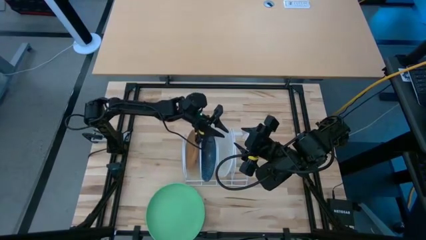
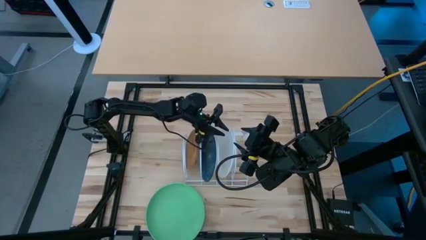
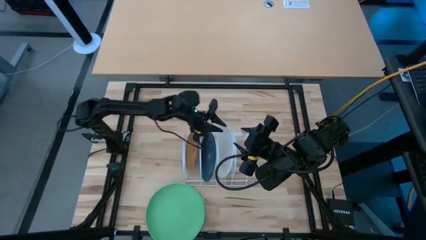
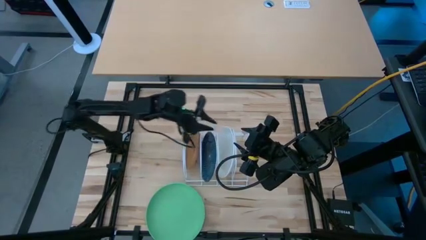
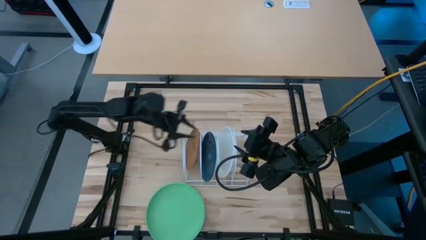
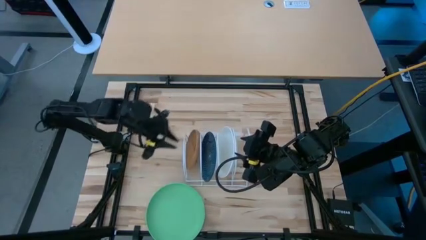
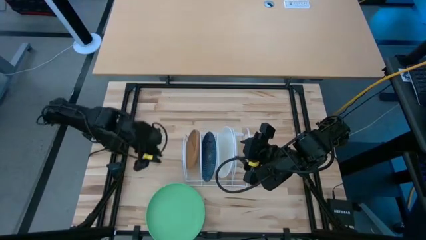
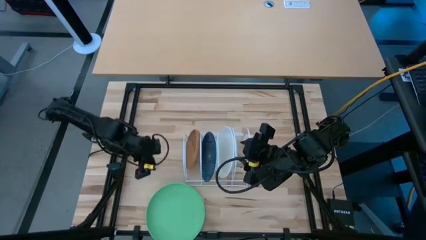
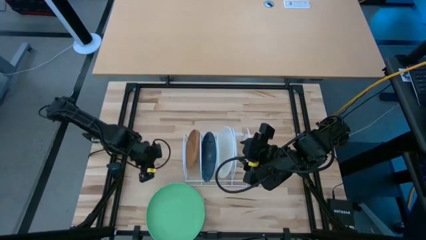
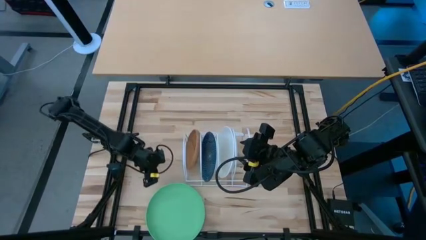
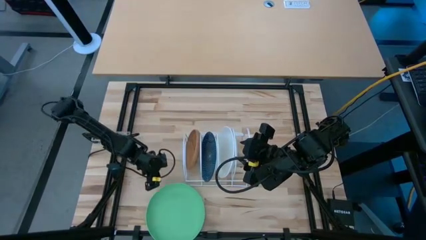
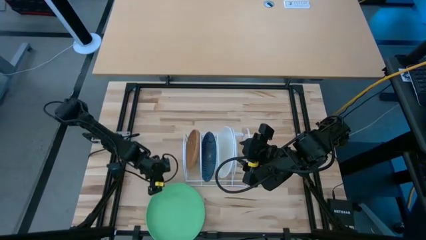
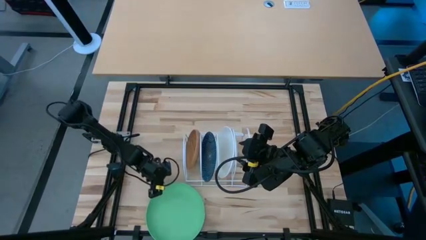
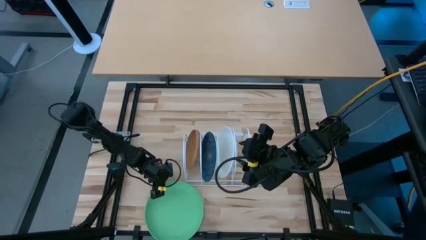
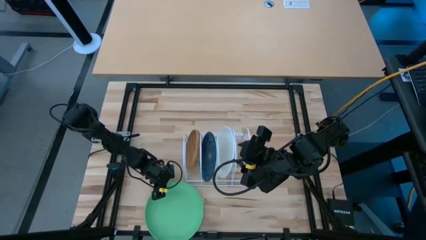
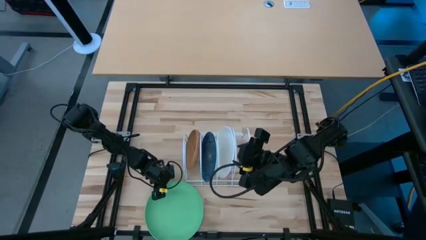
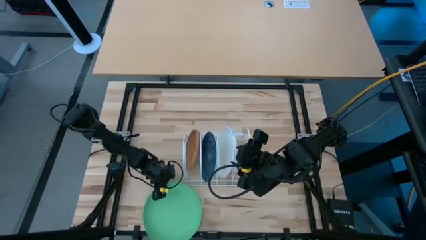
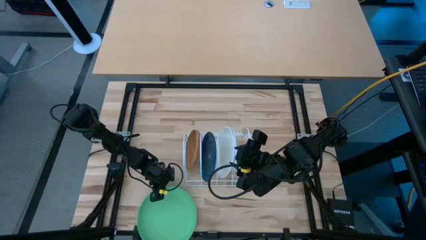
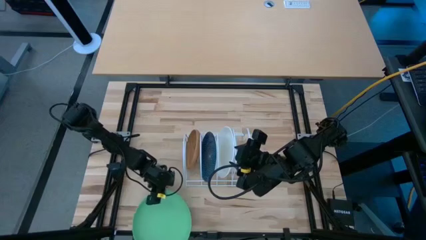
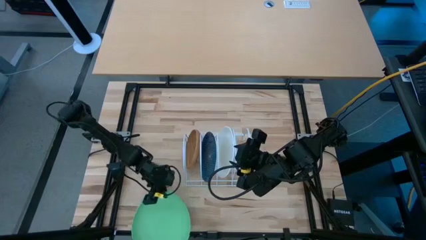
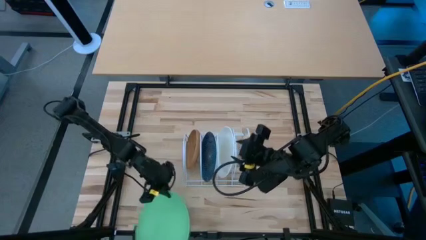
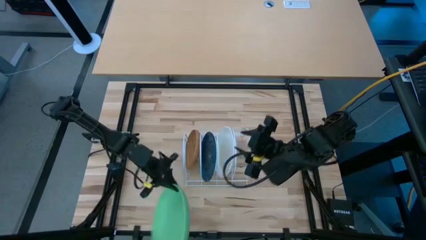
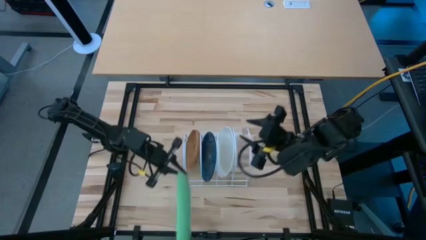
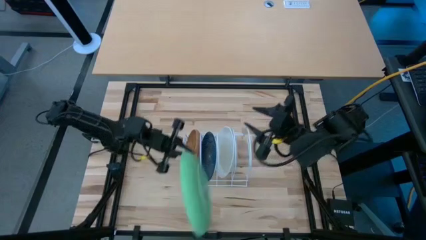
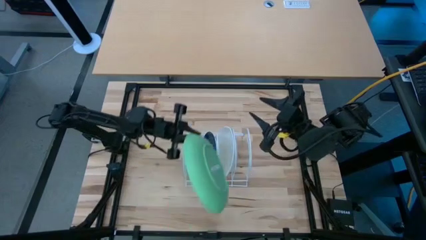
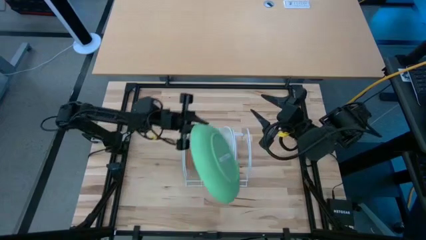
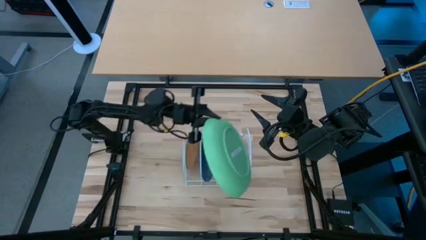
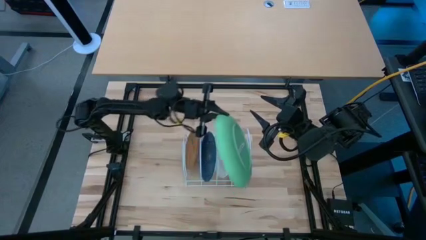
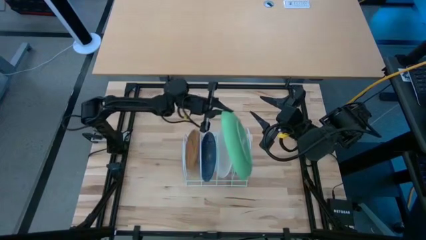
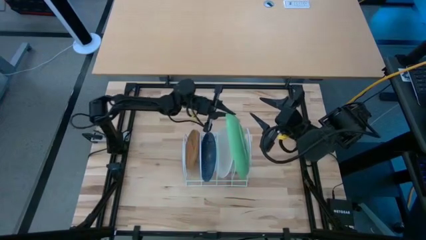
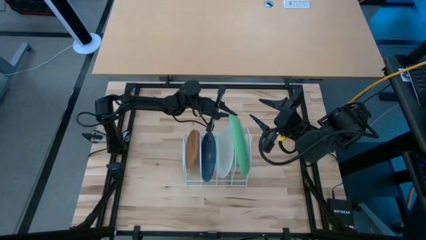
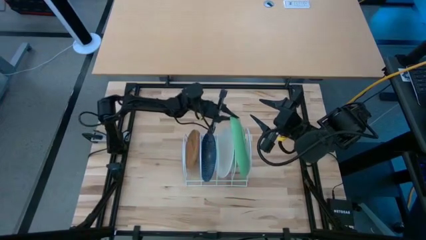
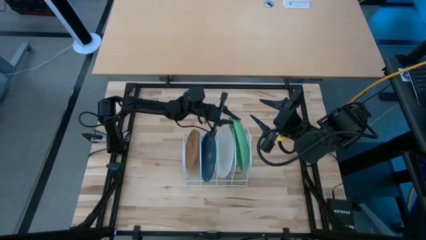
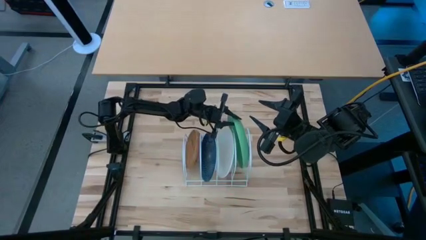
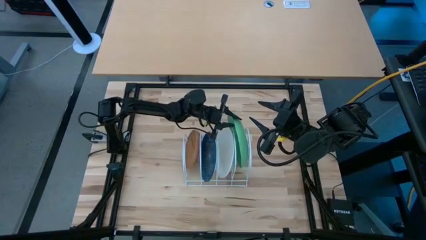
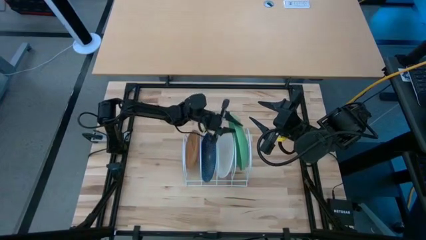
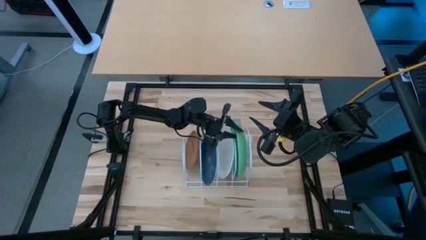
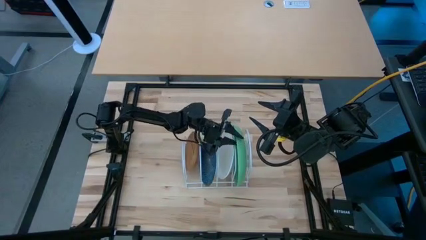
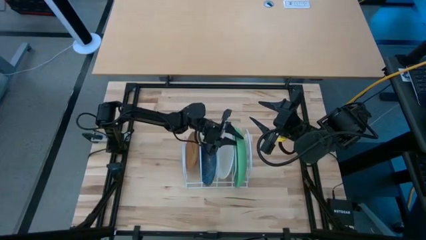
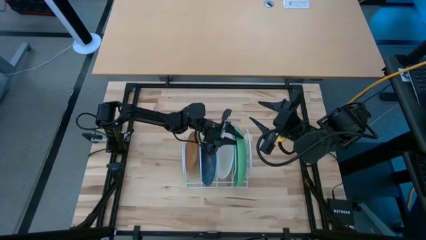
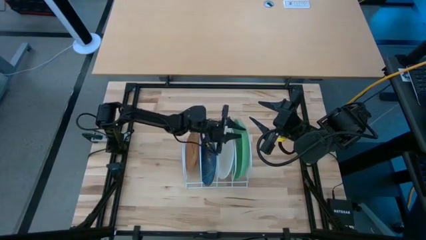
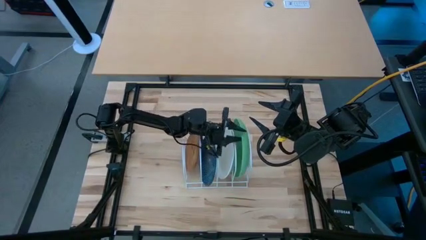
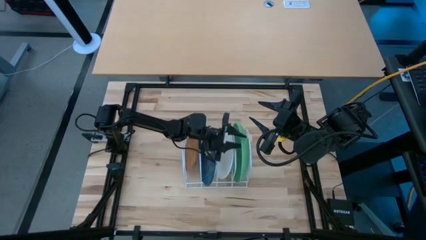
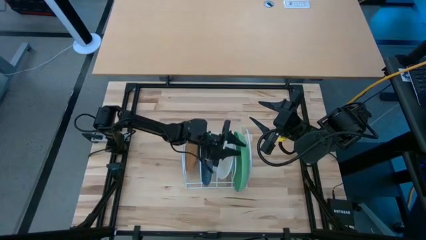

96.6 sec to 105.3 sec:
Task: Sort dishes
Put the green plate into the dish rack

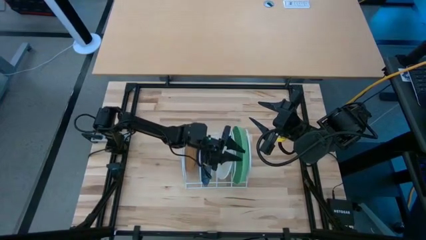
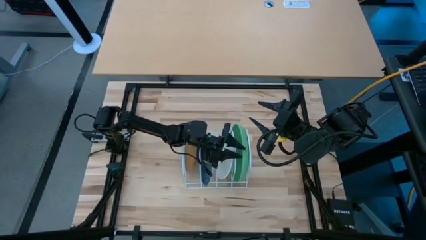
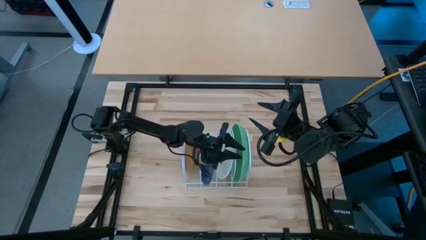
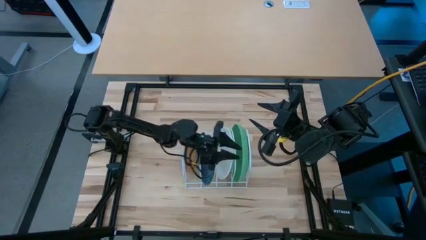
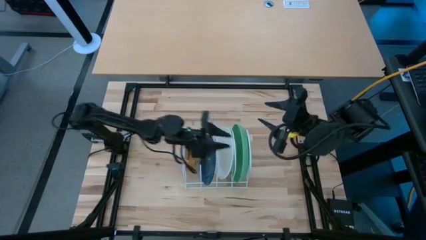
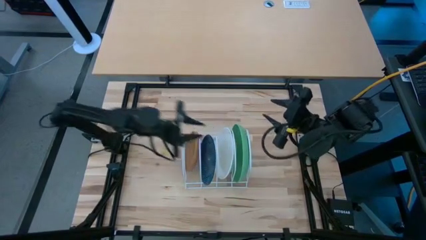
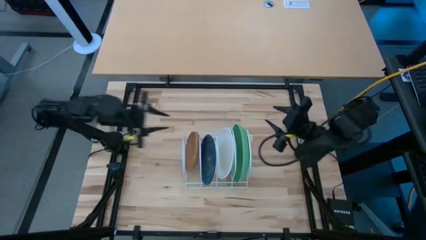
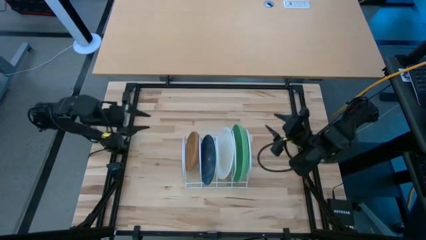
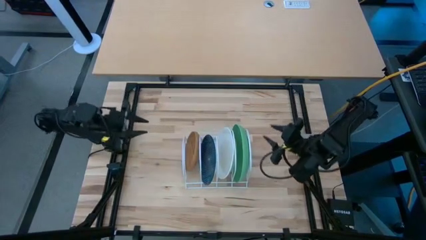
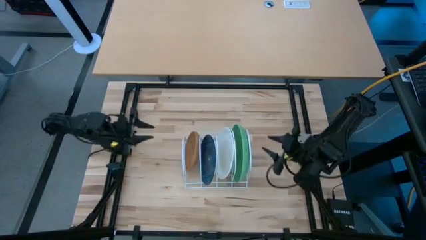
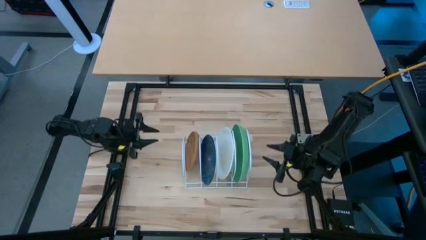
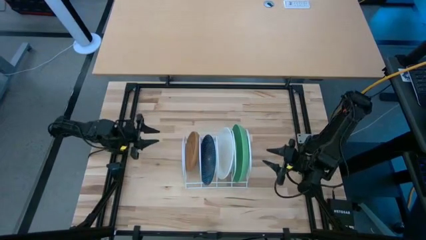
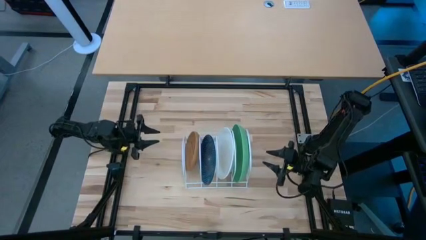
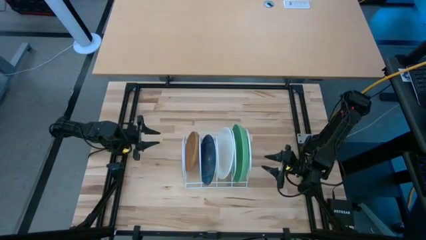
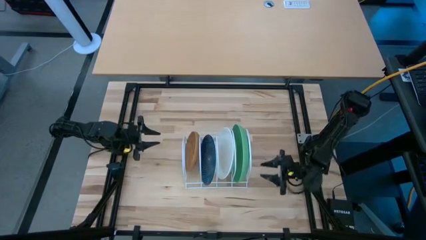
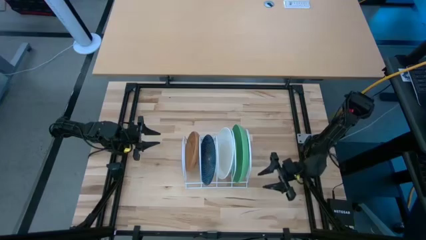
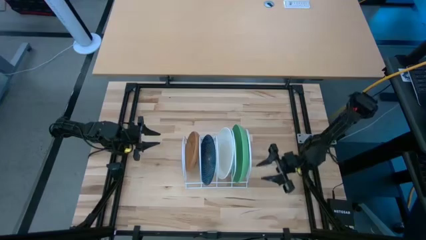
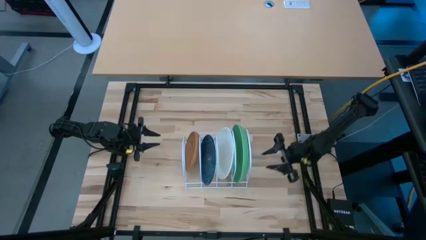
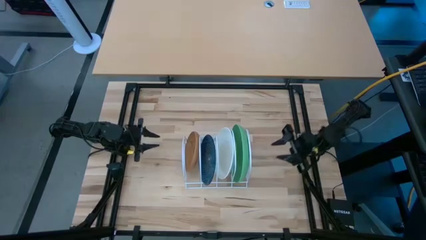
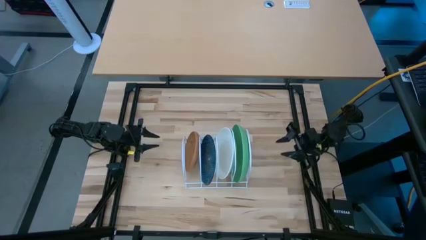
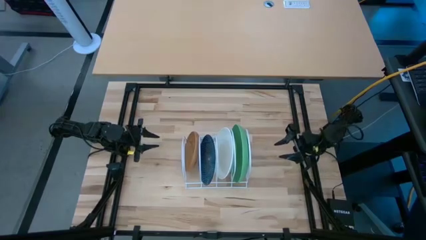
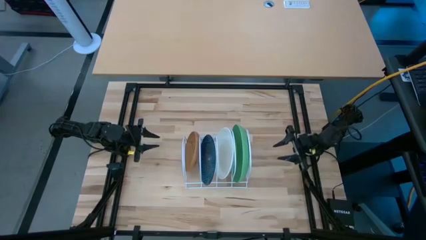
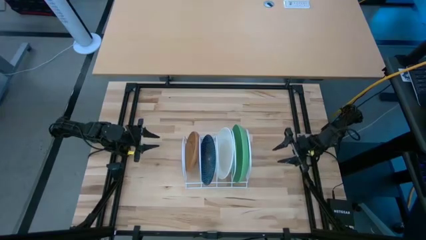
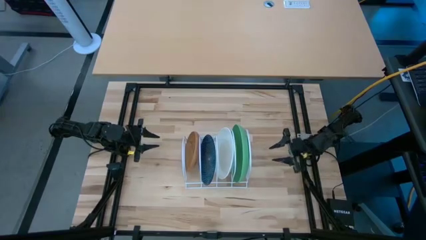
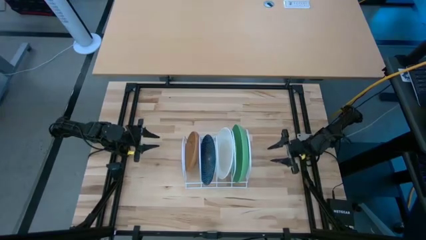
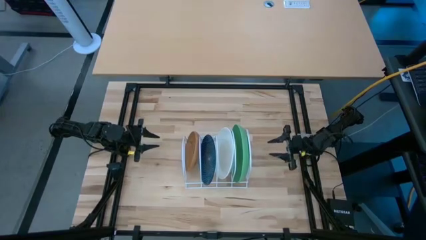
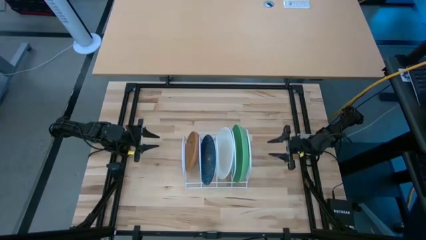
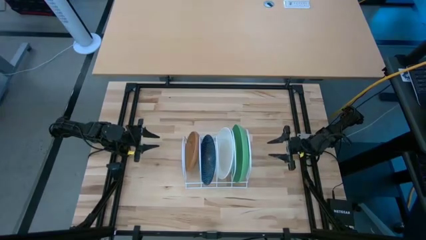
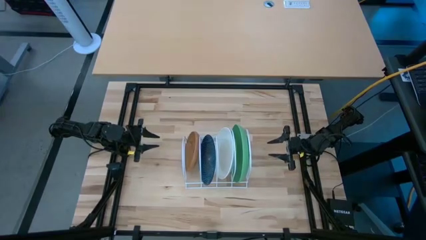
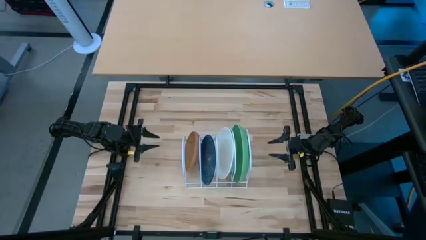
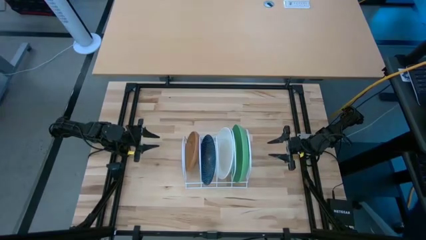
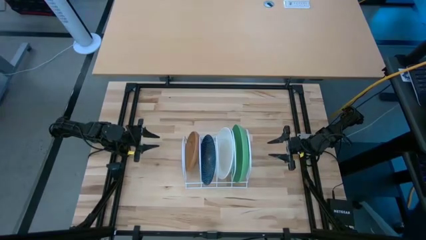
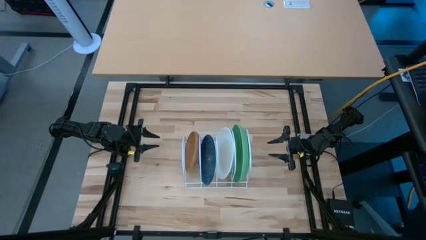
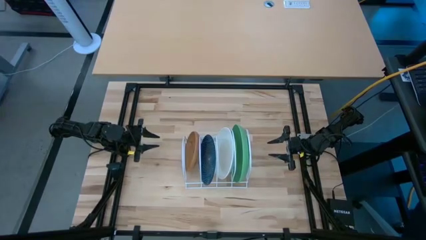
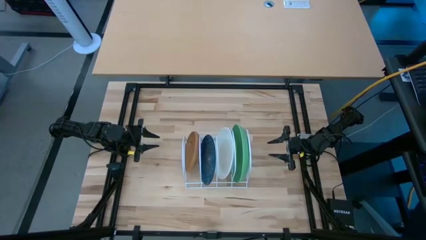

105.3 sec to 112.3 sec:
Return to Home Position
